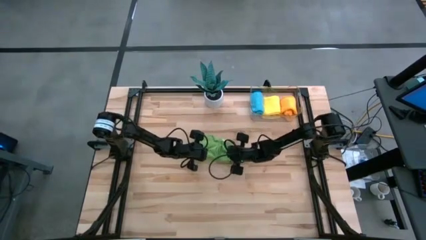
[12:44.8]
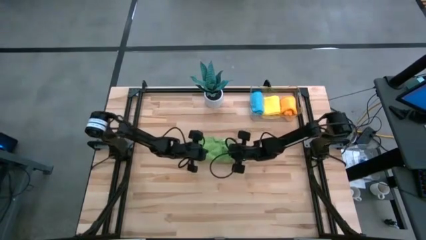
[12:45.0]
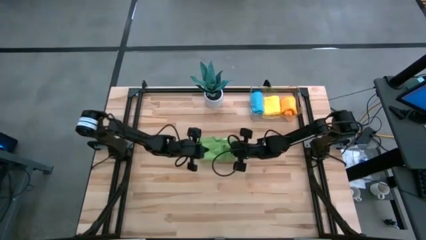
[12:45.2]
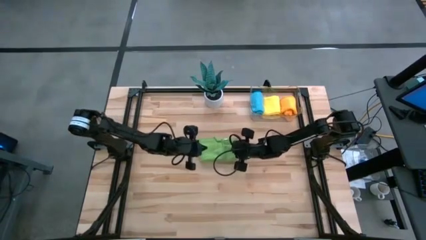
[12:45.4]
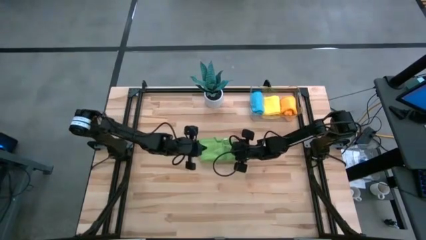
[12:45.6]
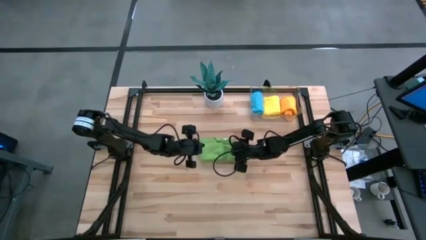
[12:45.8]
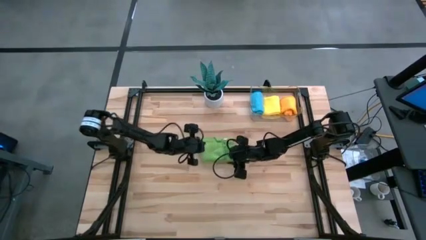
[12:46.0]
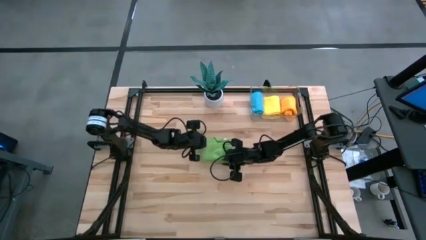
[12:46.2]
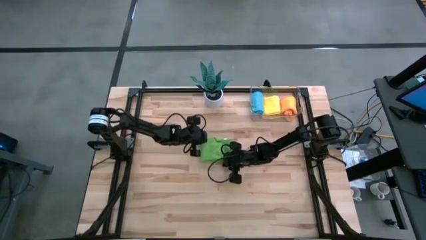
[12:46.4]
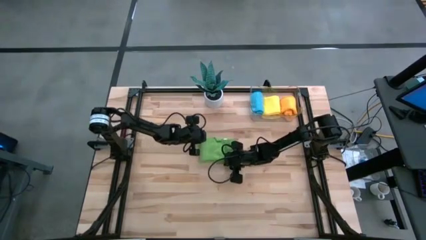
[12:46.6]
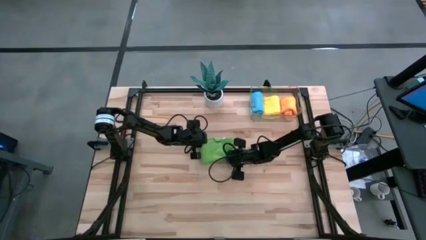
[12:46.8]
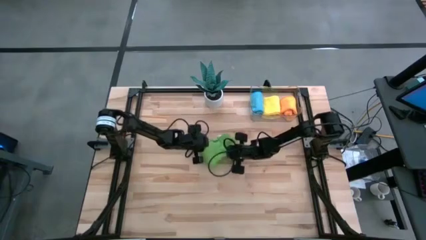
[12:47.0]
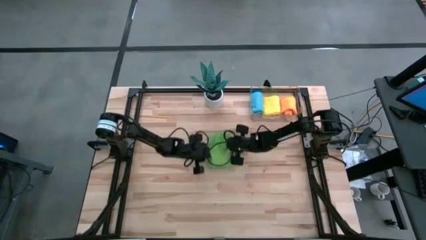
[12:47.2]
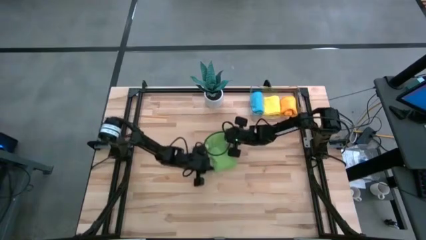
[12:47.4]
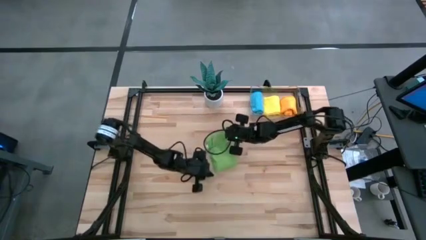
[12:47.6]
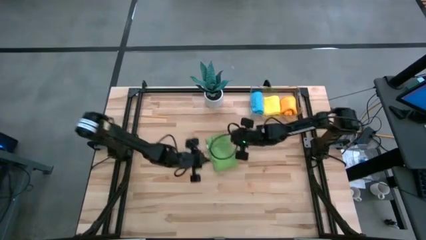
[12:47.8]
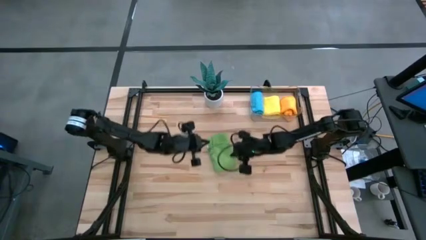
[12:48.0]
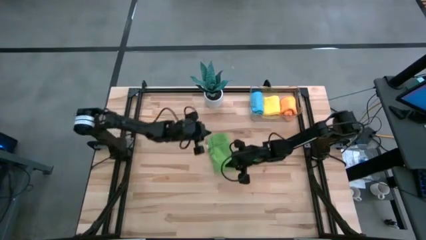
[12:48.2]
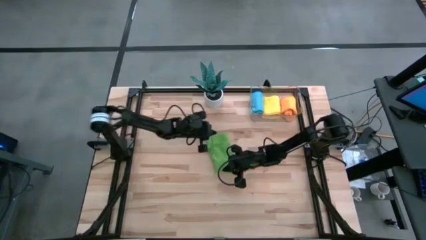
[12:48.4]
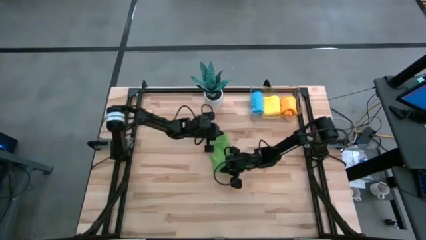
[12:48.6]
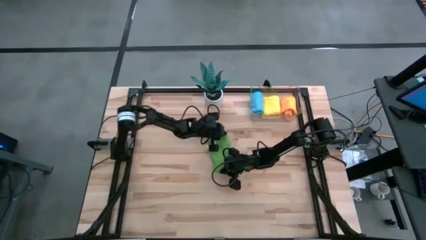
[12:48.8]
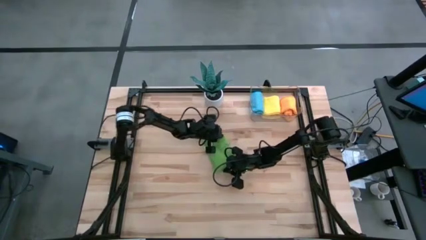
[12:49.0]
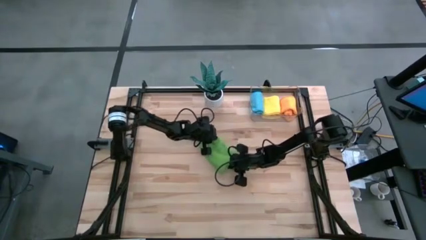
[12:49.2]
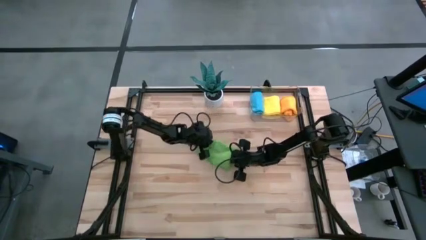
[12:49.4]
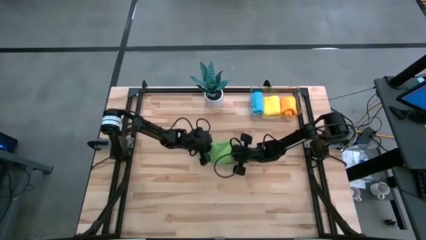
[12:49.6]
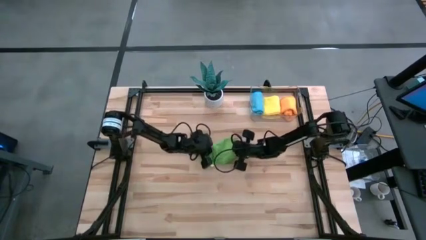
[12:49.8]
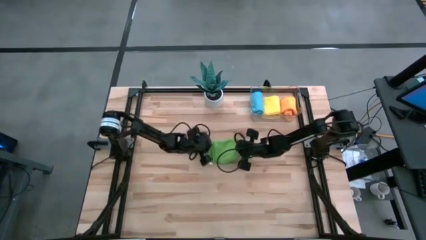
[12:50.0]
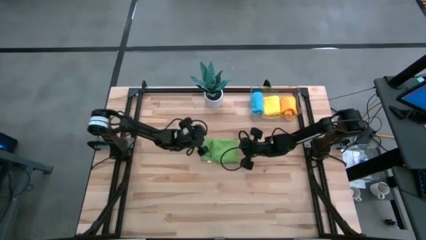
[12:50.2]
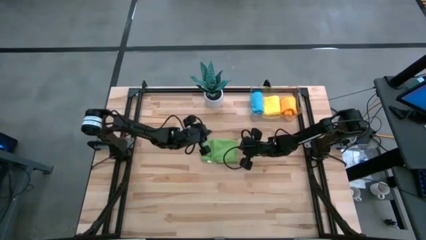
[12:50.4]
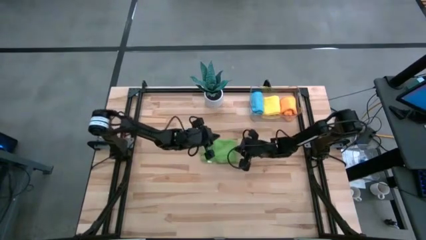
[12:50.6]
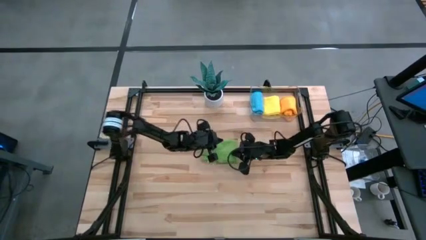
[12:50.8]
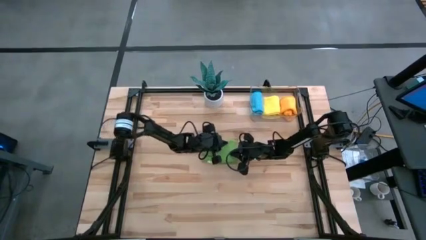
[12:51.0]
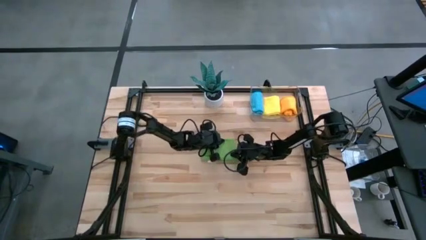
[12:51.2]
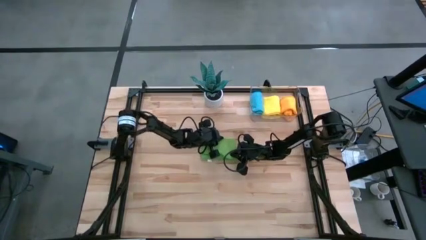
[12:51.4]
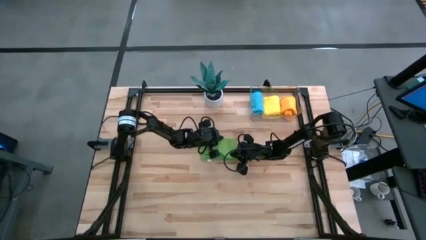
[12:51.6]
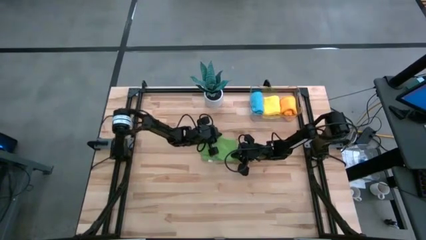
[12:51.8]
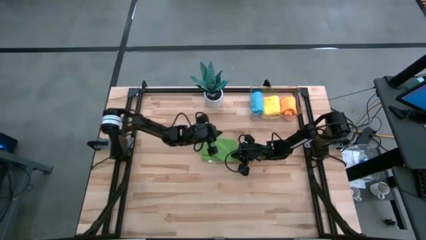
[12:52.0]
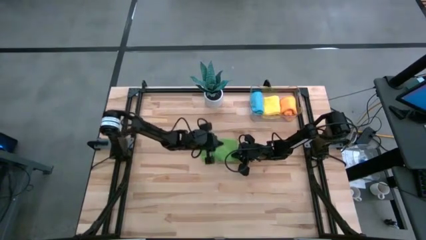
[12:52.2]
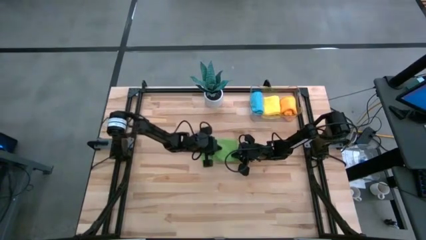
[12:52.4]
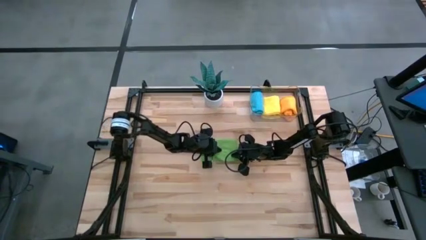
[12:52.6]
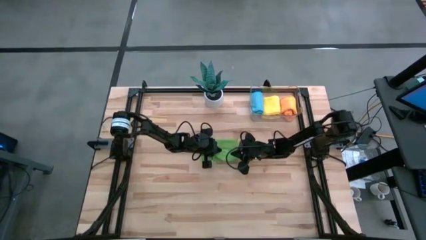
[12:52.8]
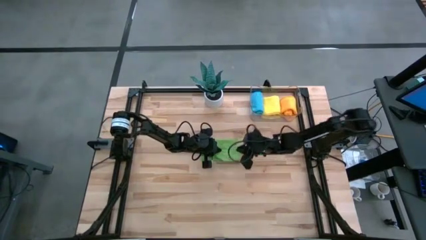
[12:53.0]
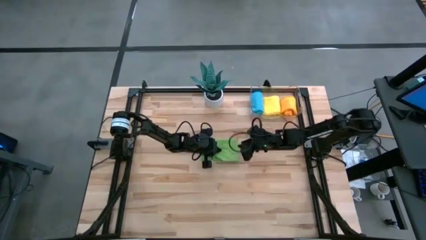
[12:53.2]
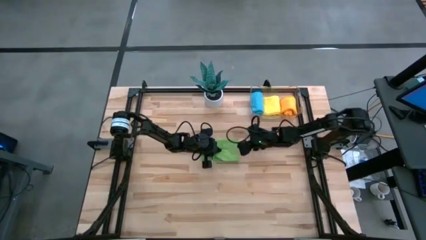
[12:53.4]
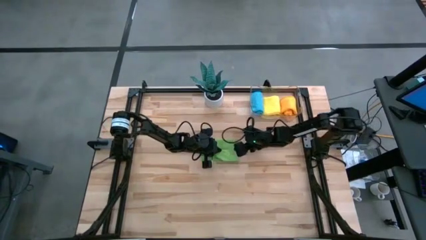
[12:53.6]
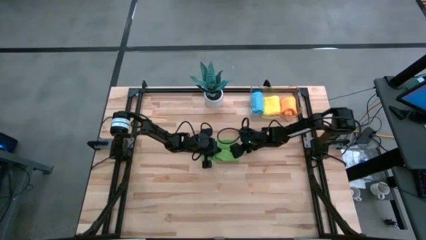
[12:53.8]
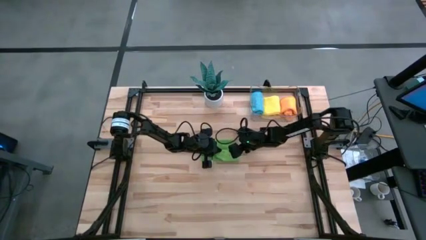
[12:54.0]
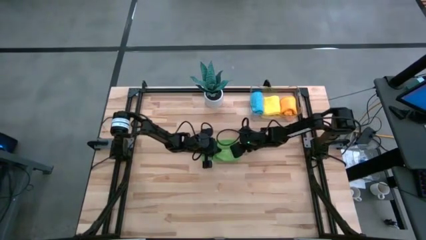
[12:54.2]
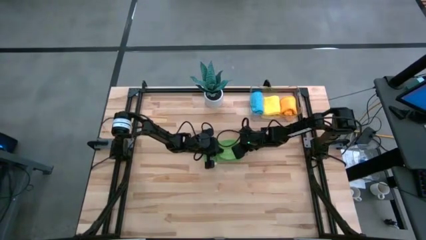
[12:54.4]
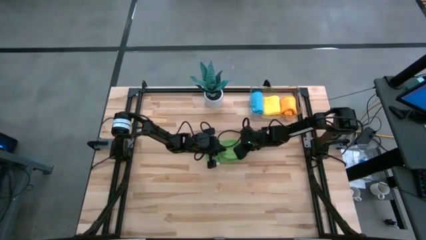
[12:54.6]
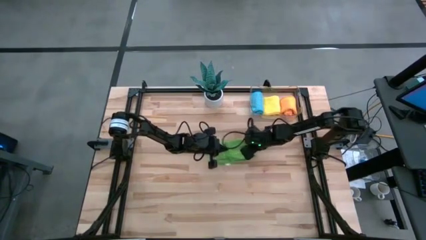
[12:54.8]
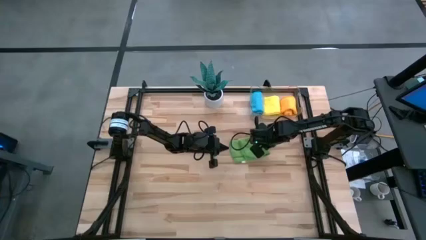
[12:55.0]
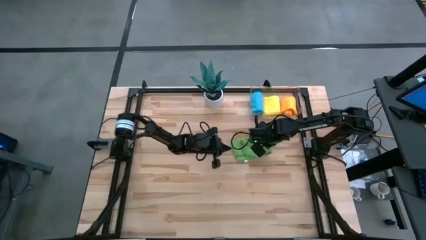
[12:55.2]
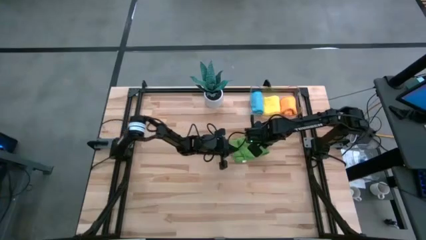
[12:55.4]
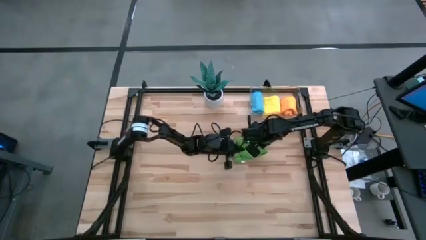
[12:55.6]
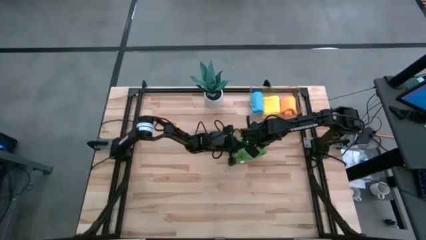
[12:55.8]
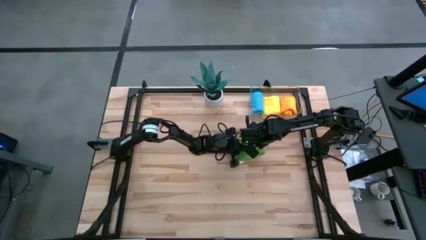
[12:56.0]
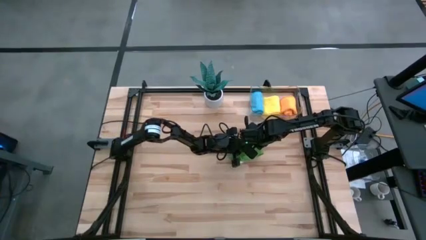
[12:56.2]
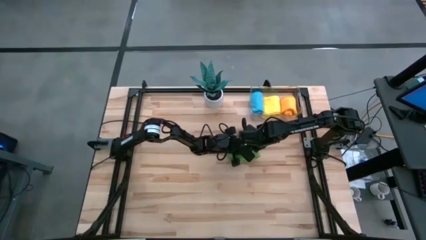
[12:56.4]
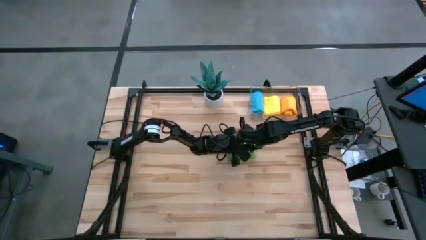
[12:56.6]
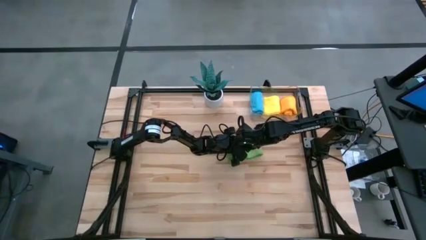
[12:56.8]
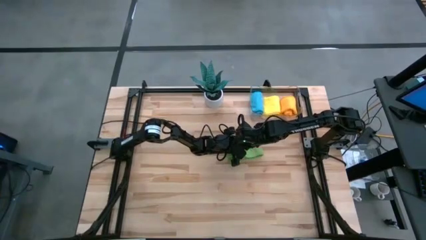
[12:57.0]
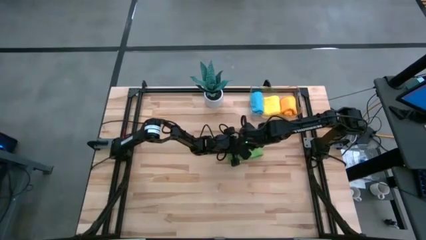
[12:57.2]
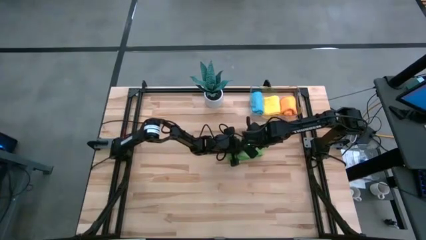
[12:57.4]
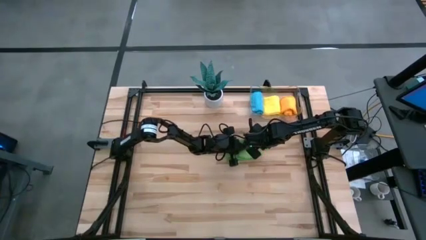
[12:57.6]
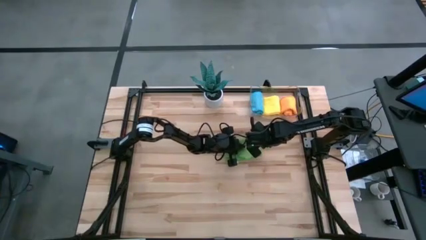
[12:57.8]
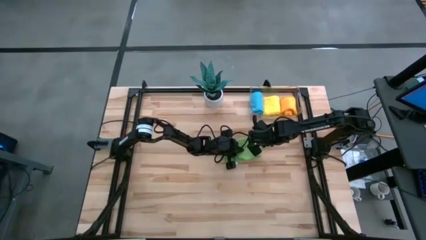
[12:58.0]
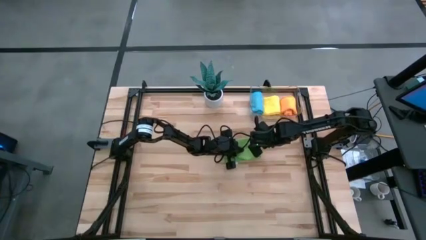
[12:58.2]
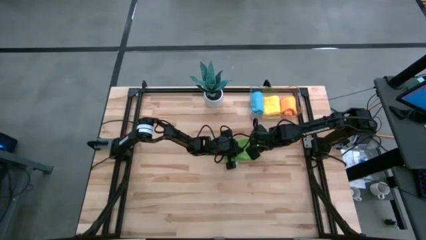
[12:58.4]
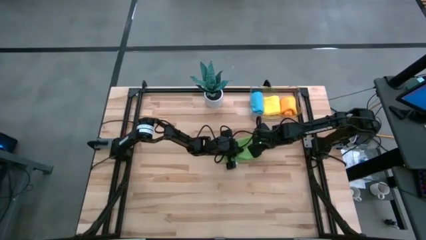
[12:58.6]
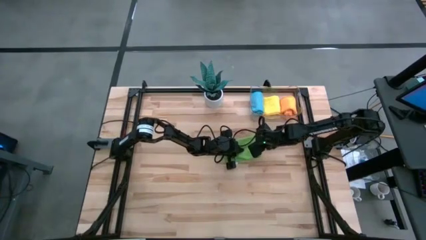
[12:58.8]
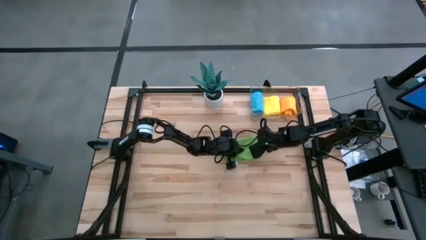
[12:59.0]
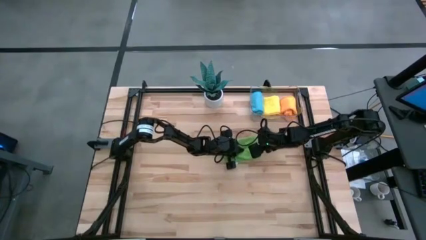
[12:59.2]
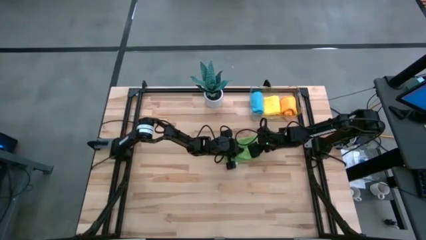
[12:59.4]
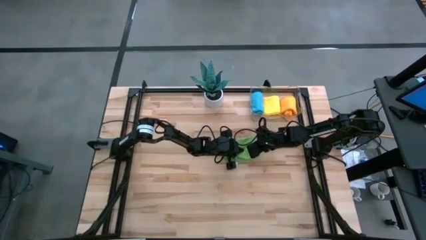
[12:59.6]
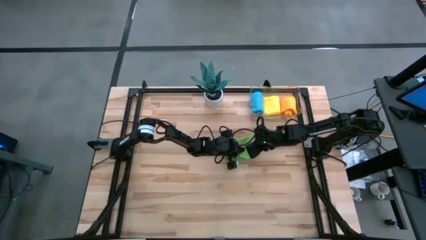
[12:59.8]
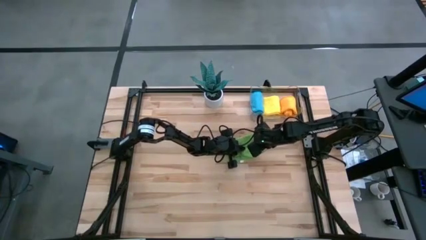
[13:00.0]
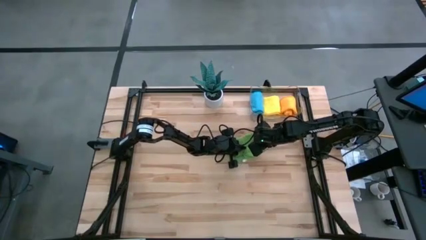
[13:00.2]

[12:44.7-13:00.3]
Task: Roll microfiber towels into tight, uniform cylinder then place into a basket
Roll the green microfiber cloth
